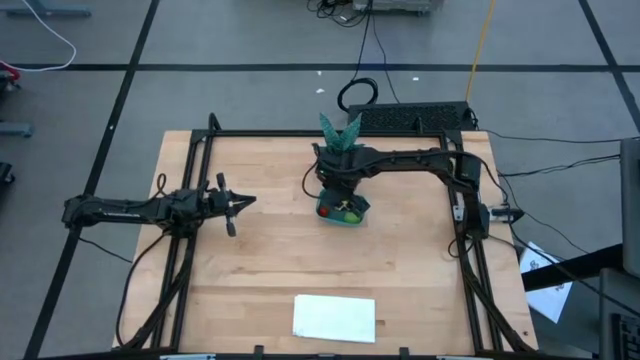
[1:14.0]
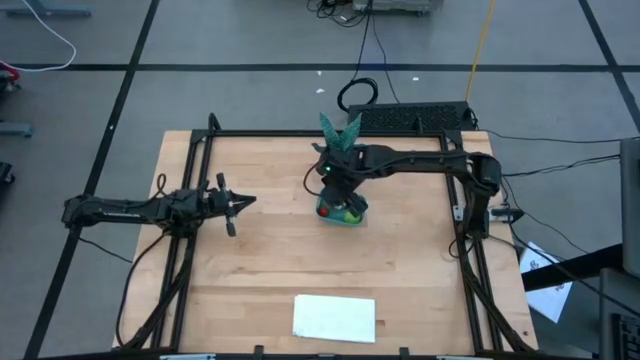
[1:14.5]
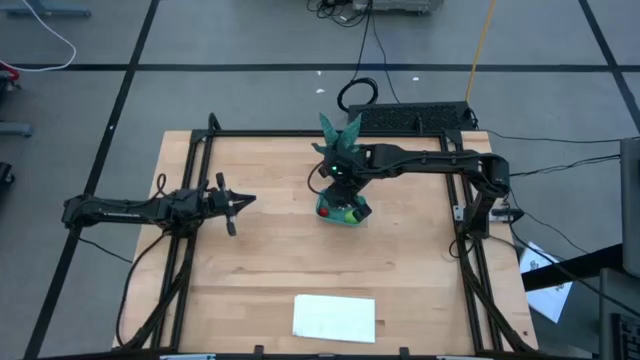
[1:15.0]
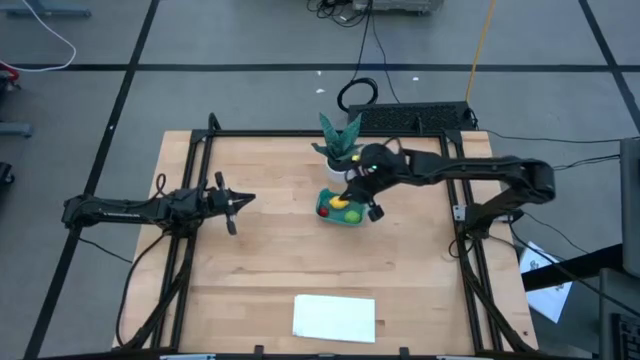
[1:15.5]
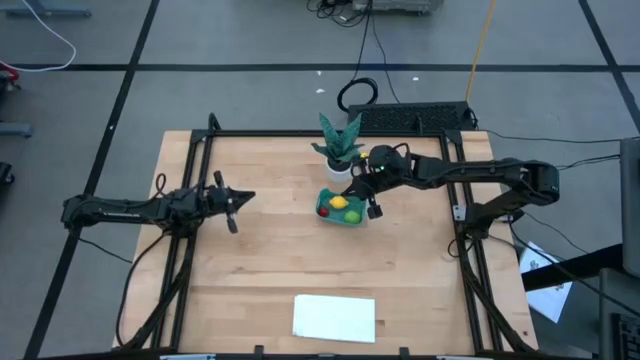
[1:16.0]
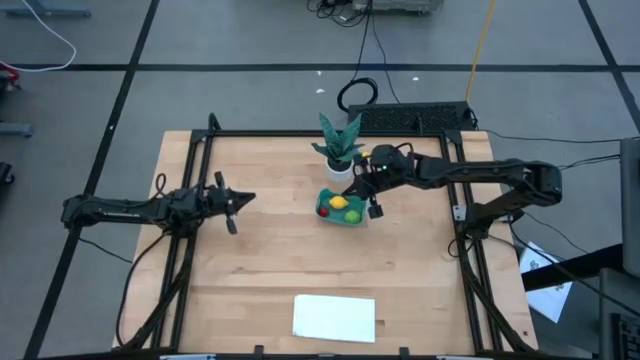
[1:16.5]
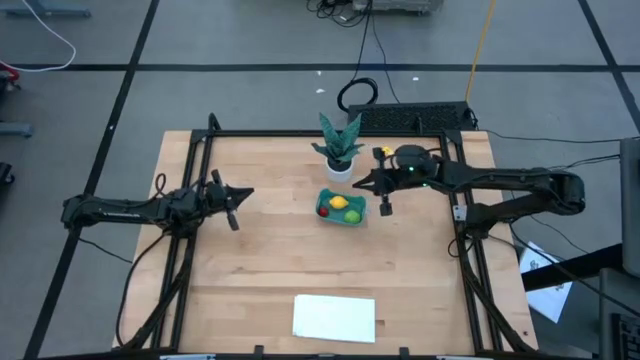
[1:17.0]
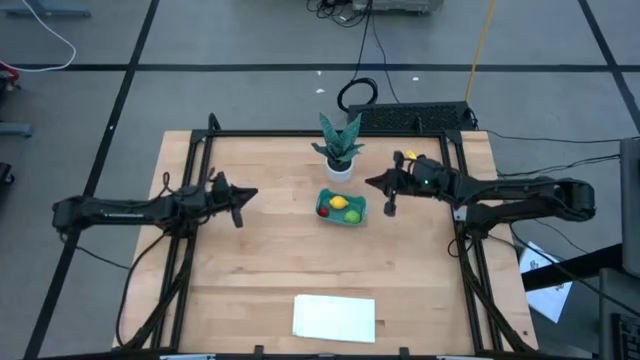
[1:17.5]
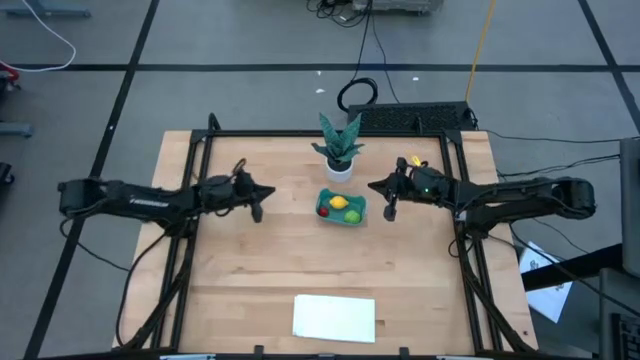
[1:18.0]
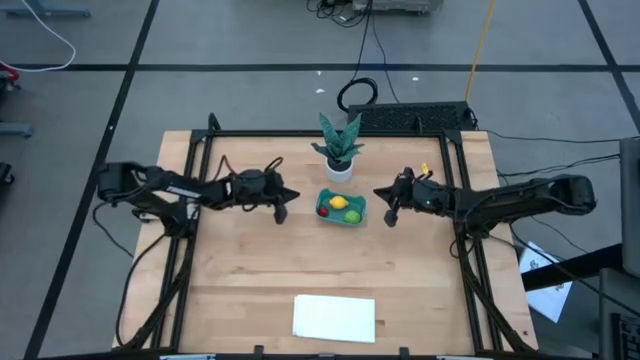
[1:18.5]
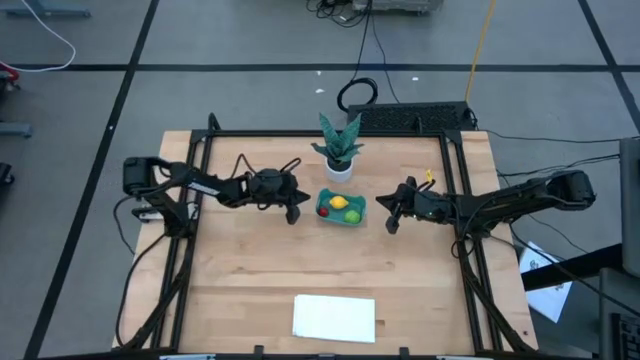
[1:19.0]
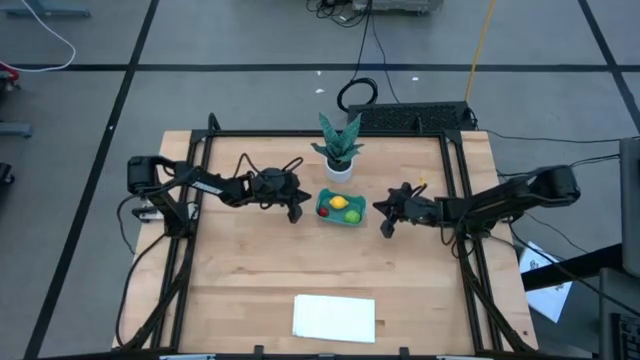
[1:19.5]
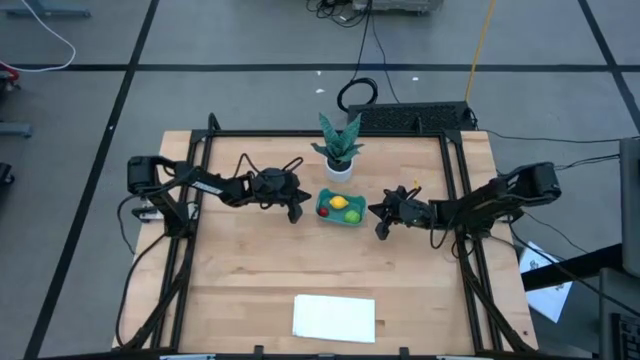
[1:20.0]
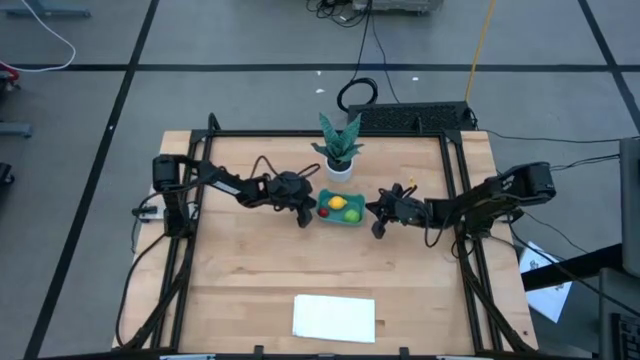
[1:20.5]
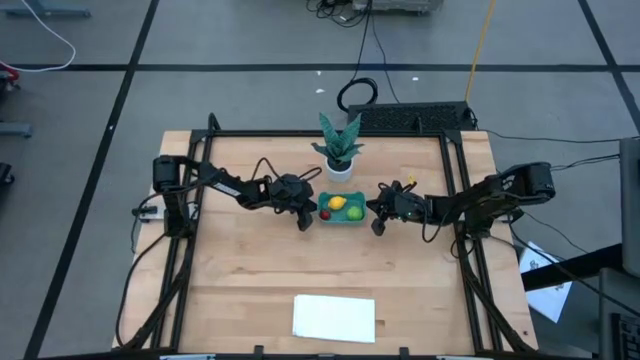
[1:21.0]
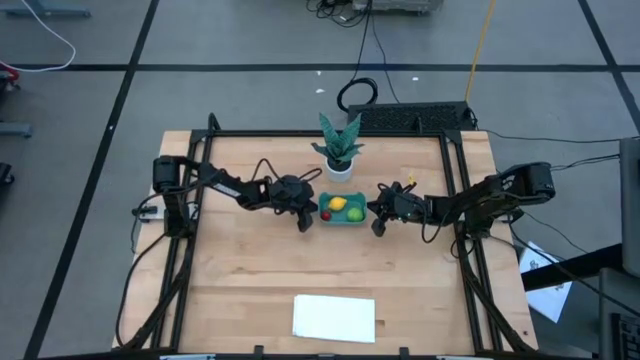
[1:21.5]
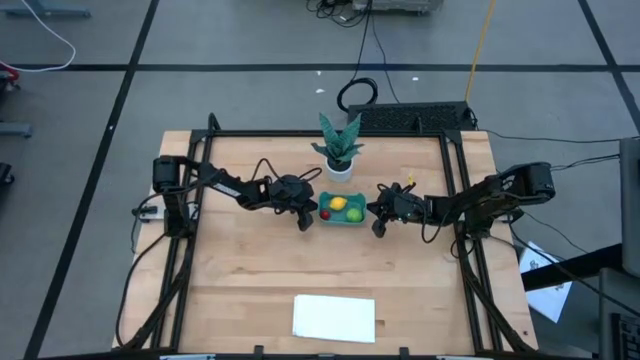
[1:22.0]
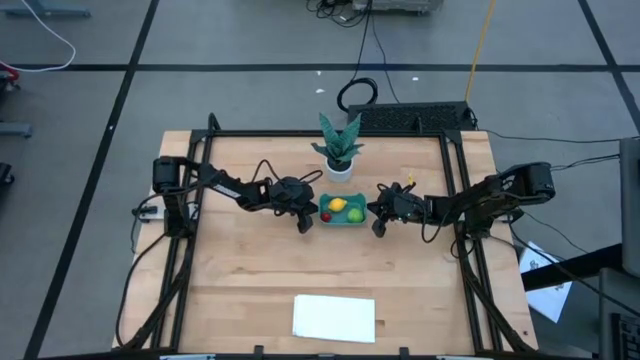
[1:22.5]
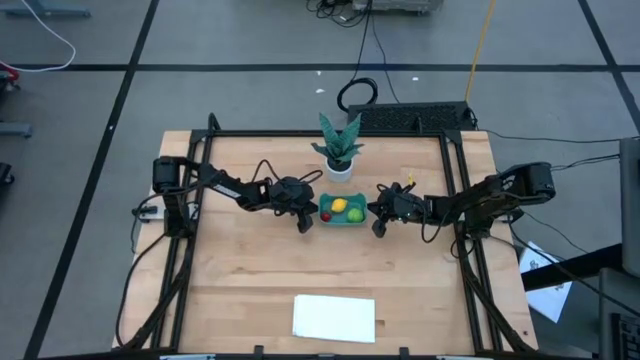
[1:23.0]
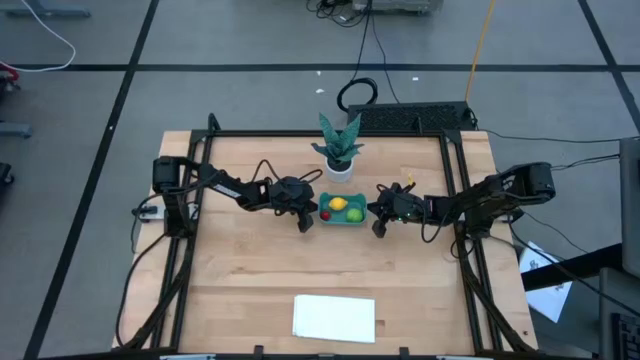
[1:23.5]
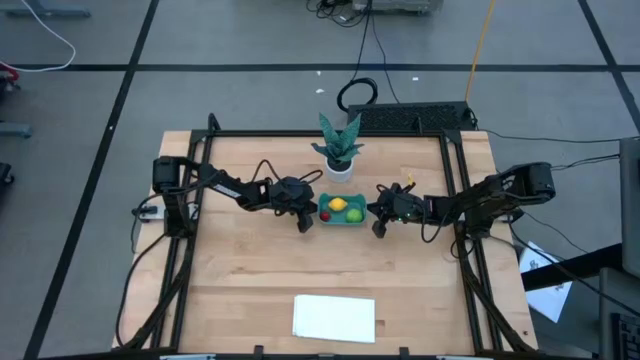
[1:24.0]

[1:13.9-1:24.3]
Task: Pick and placing Produce into tupperware
Adjust the green bin

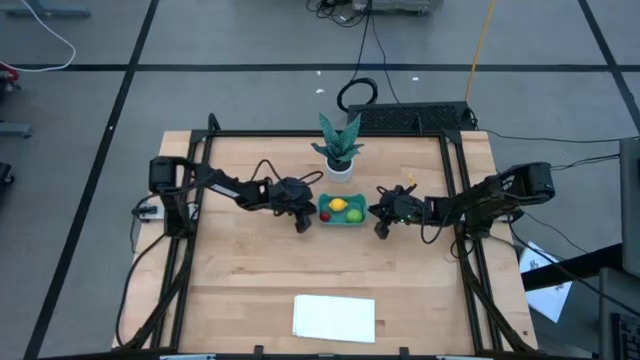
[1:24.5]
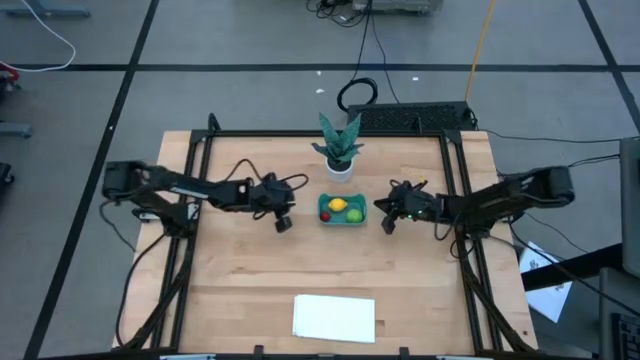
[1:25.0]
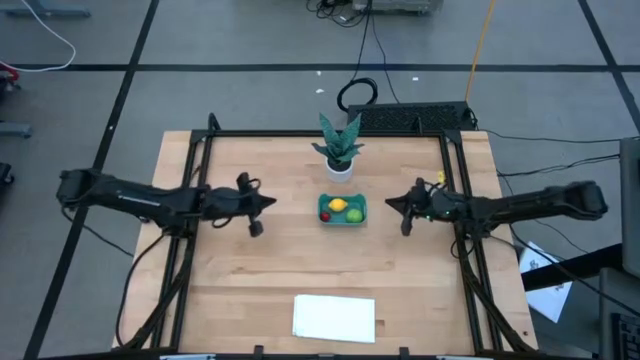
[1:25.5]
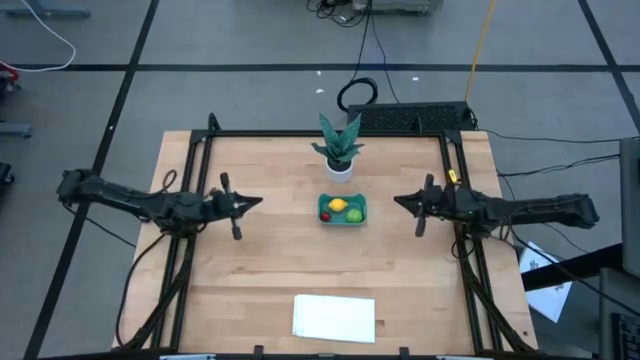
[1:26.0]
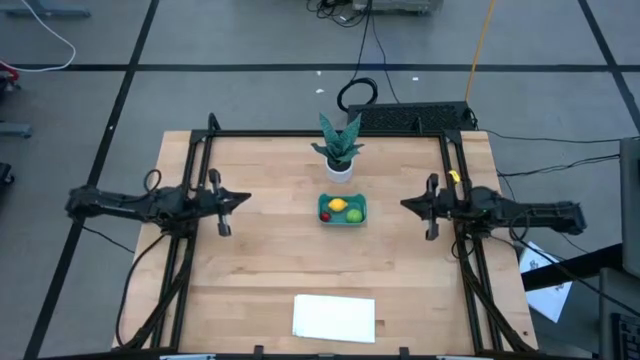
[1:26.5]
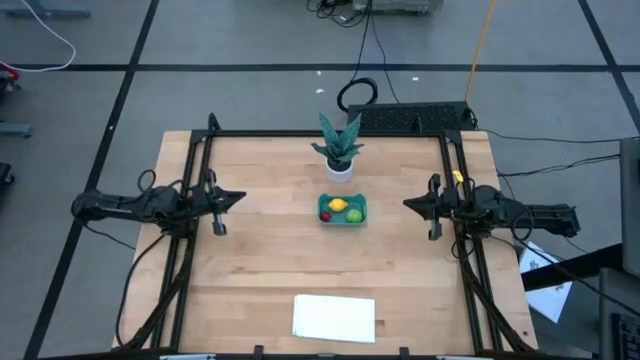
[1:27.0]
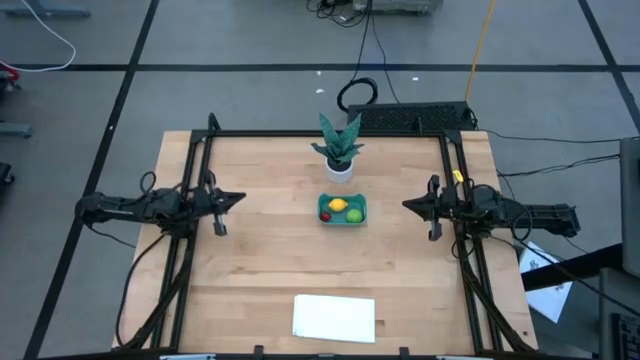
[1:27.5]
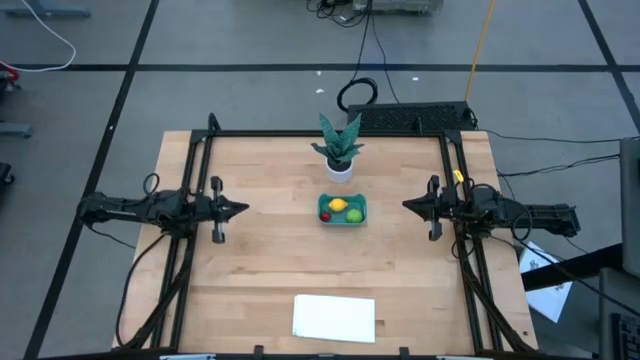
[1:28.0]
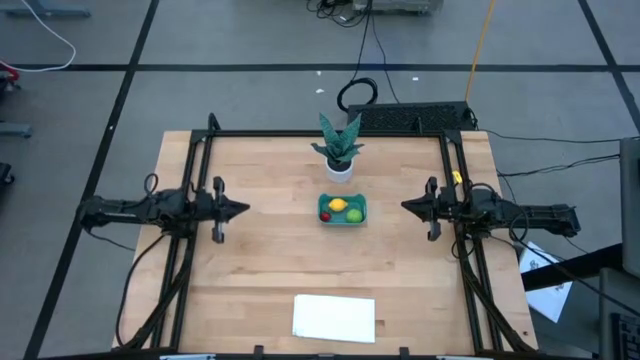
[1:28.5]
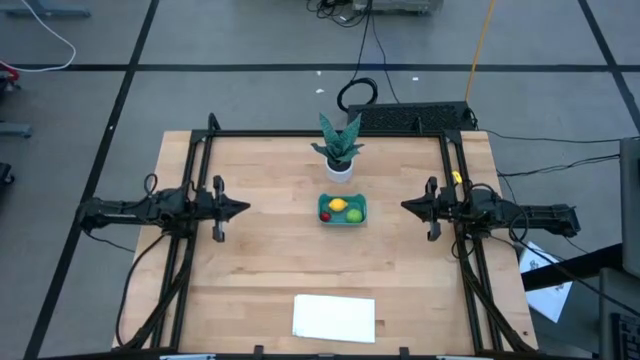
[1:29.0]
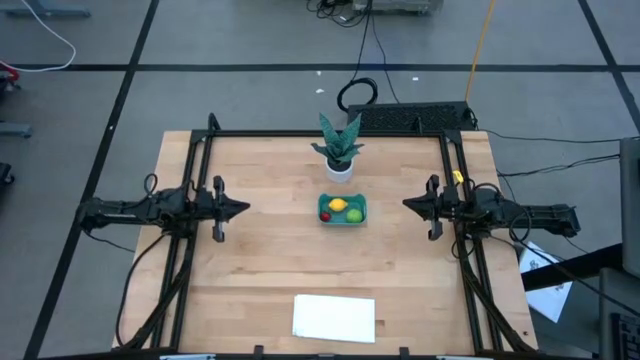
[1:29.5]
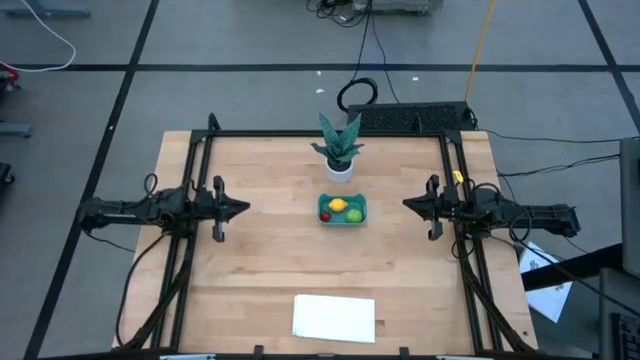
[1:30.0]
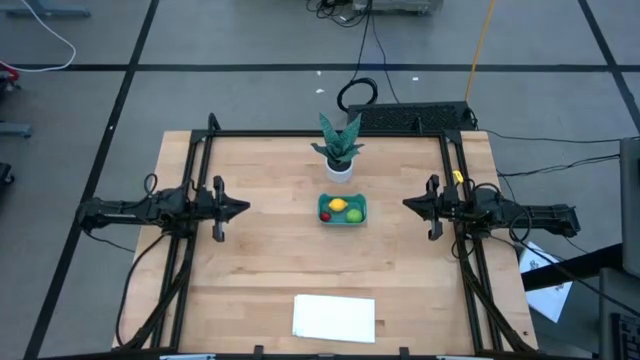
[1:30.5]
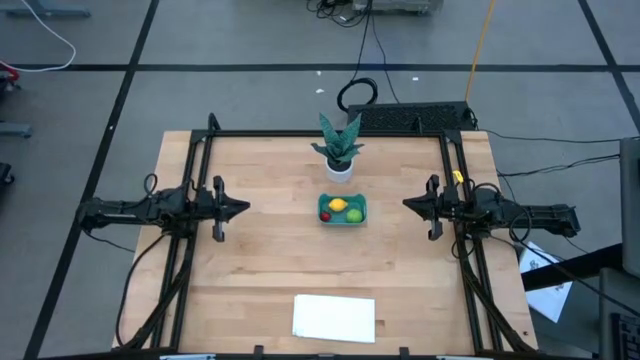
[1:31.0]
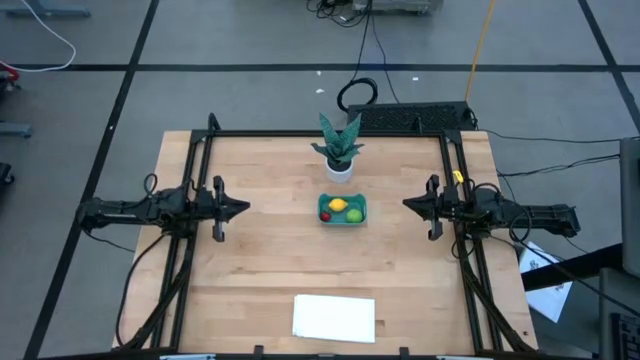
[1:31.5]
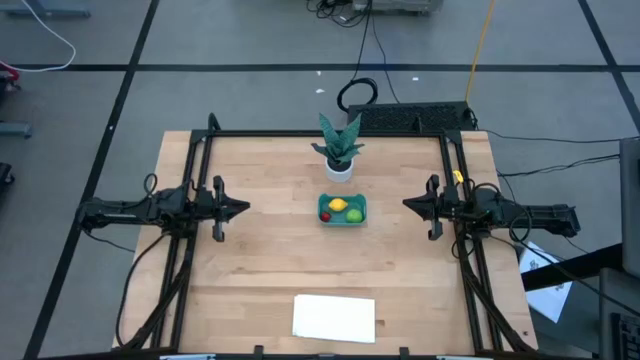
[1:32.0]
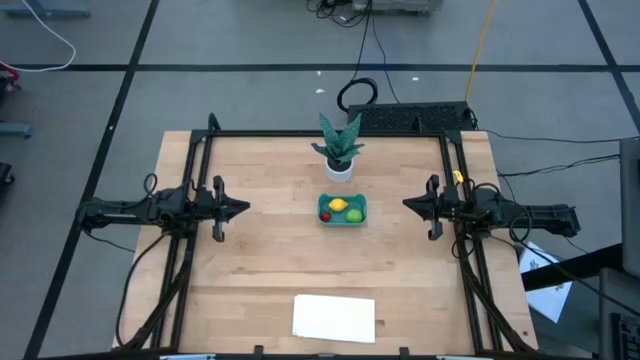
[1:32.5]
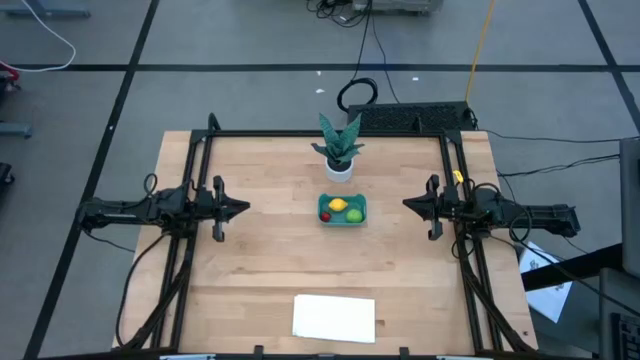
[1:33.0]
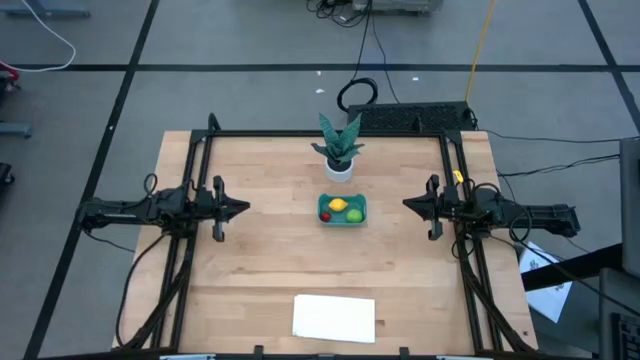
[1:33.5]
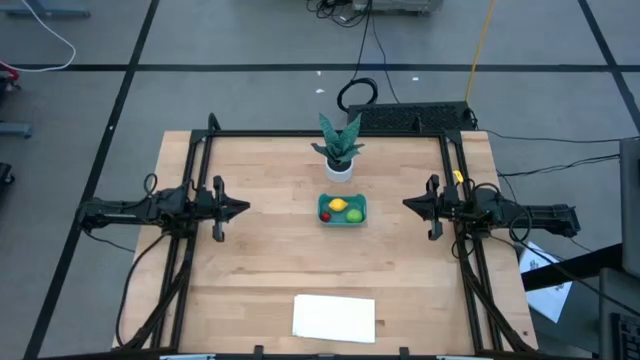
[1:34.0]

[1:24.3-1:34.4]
Return to Home Position
